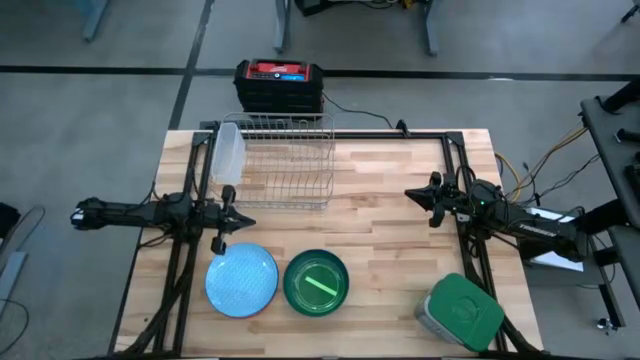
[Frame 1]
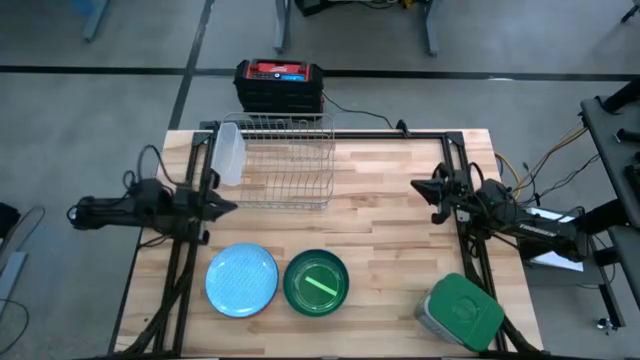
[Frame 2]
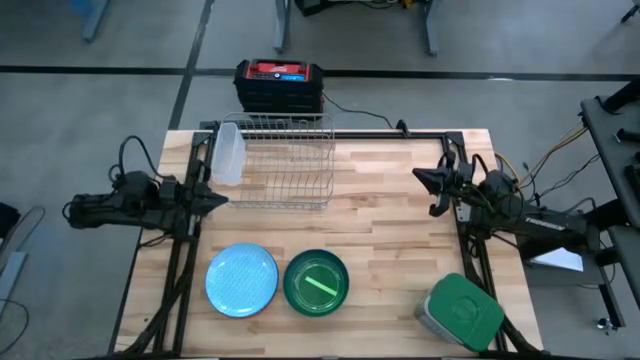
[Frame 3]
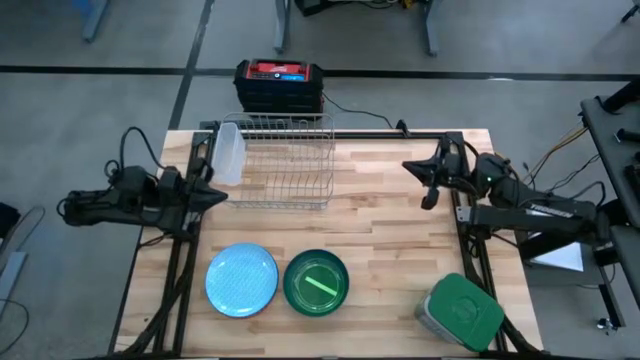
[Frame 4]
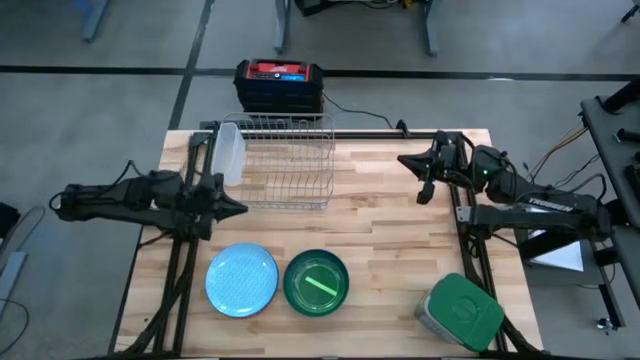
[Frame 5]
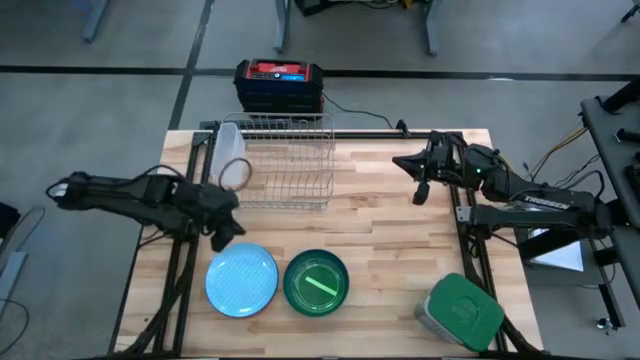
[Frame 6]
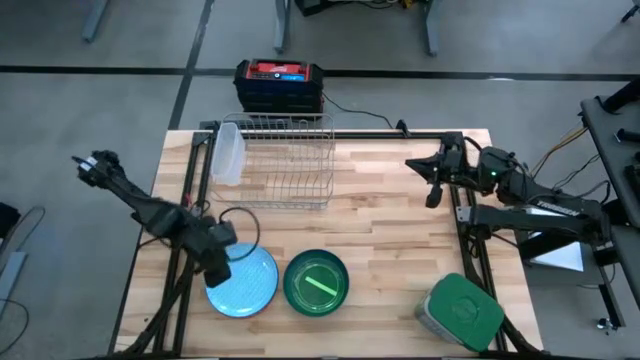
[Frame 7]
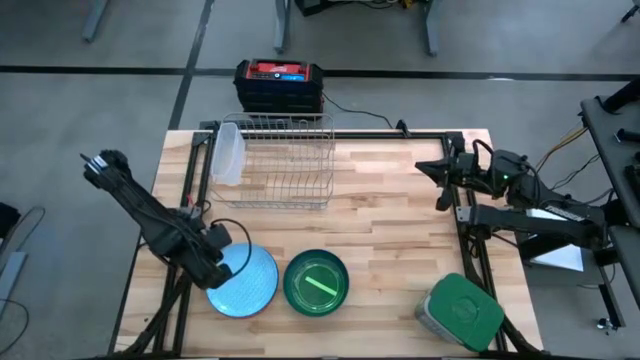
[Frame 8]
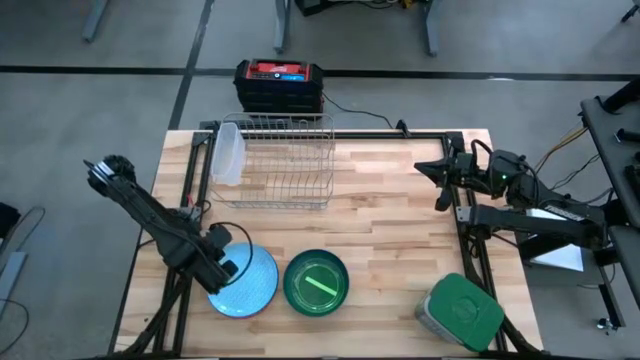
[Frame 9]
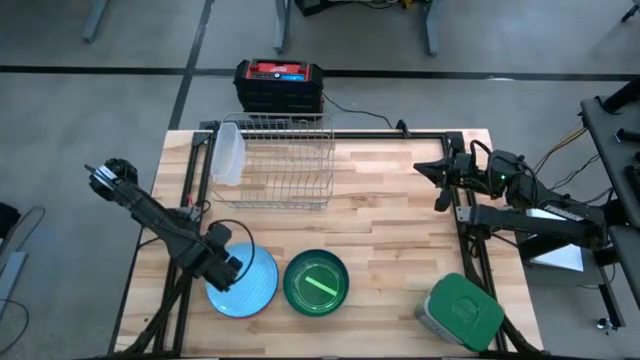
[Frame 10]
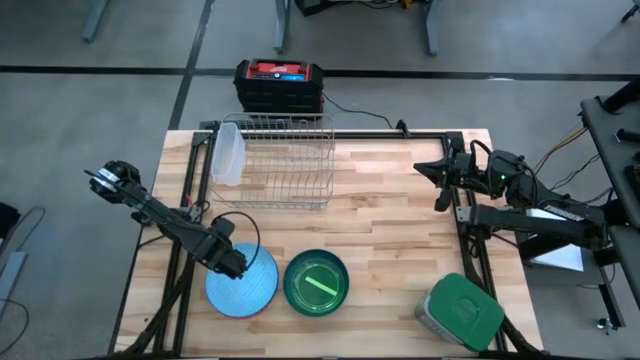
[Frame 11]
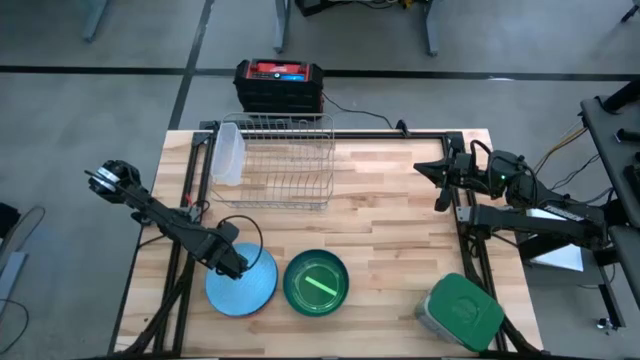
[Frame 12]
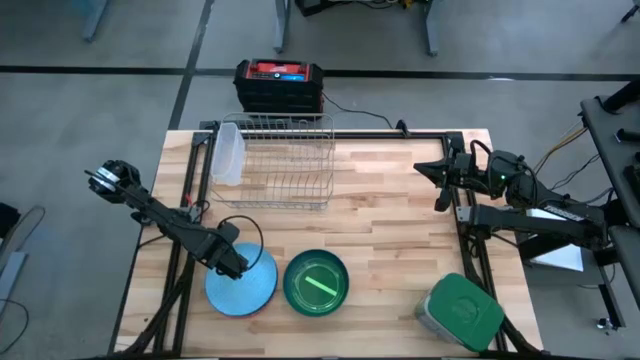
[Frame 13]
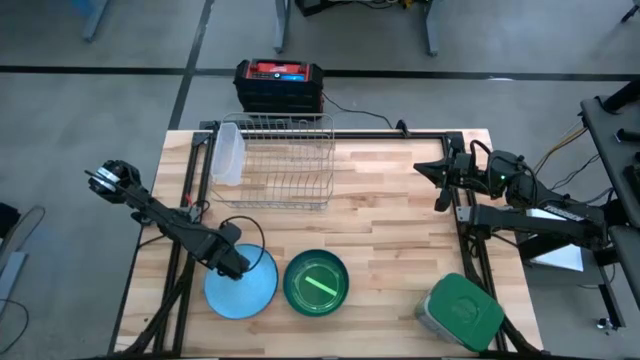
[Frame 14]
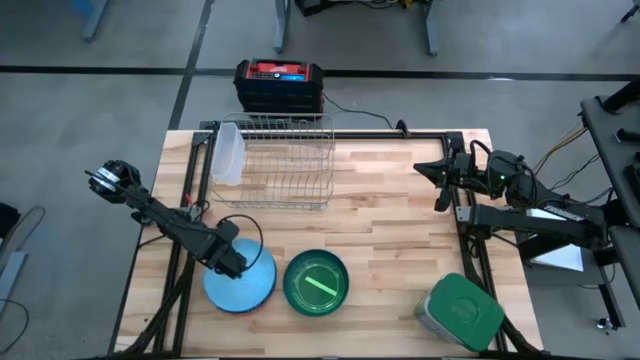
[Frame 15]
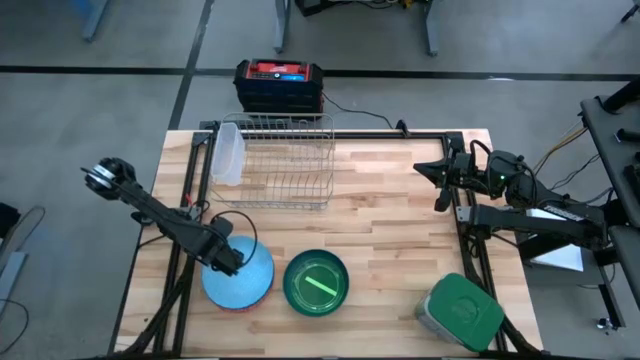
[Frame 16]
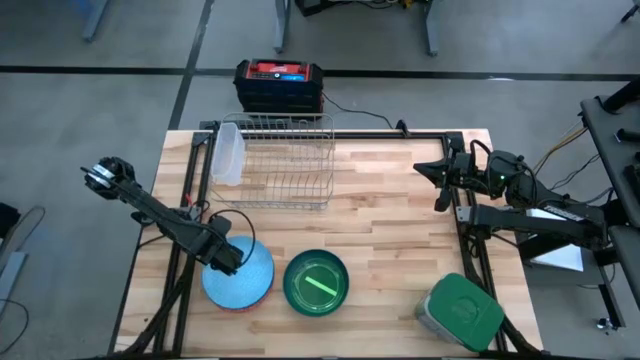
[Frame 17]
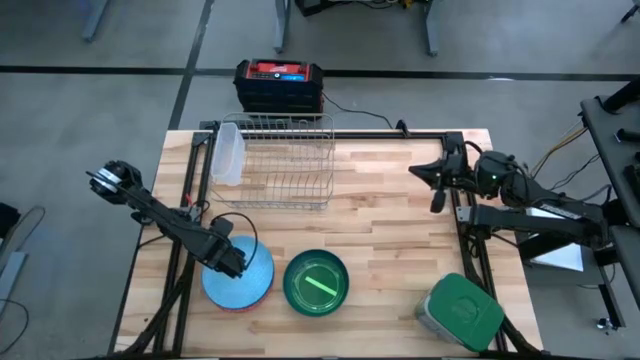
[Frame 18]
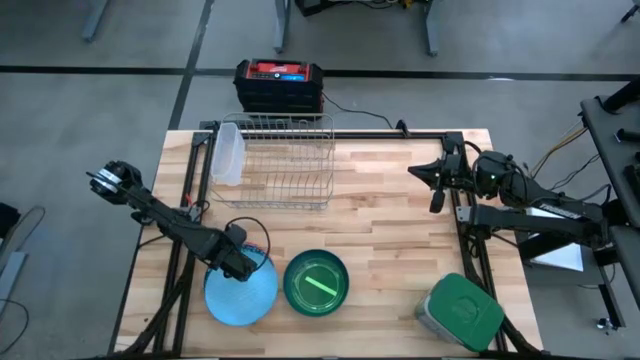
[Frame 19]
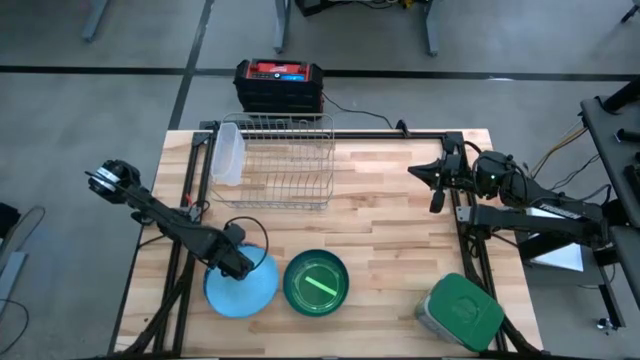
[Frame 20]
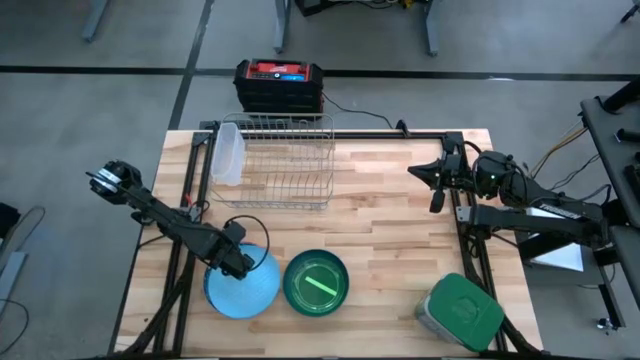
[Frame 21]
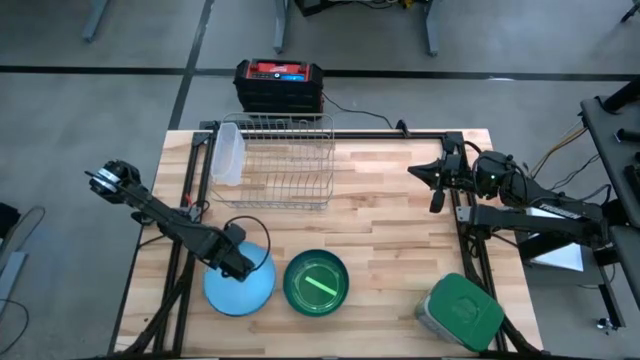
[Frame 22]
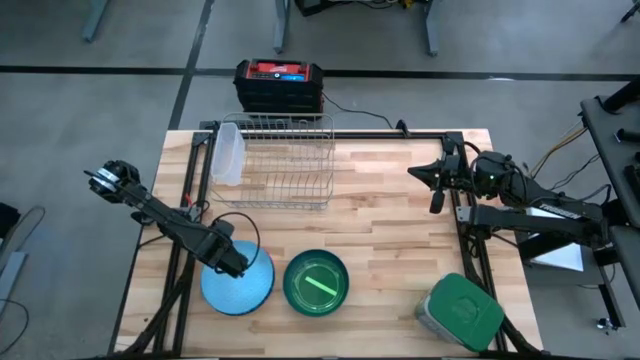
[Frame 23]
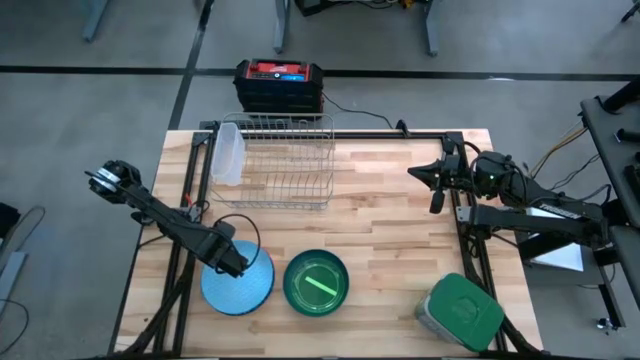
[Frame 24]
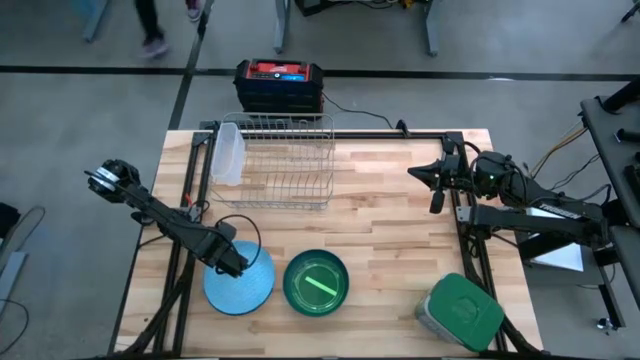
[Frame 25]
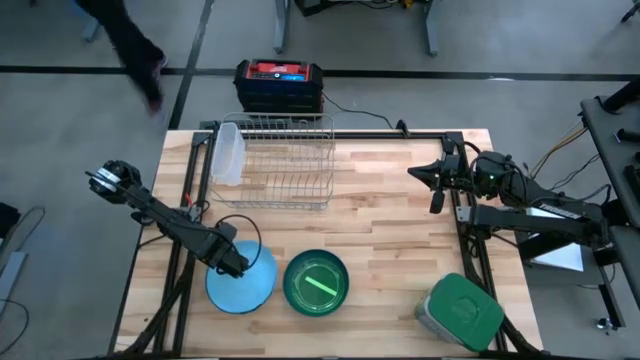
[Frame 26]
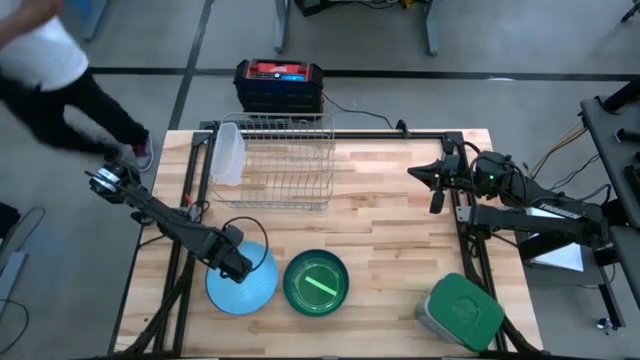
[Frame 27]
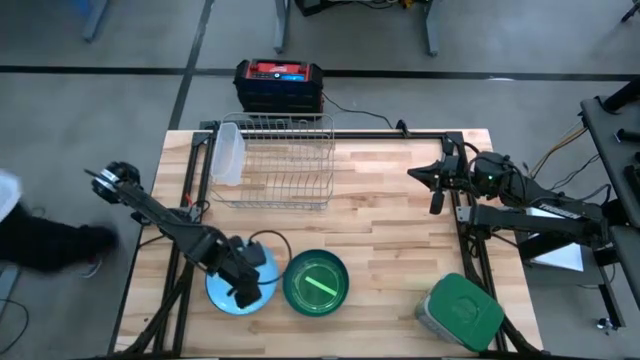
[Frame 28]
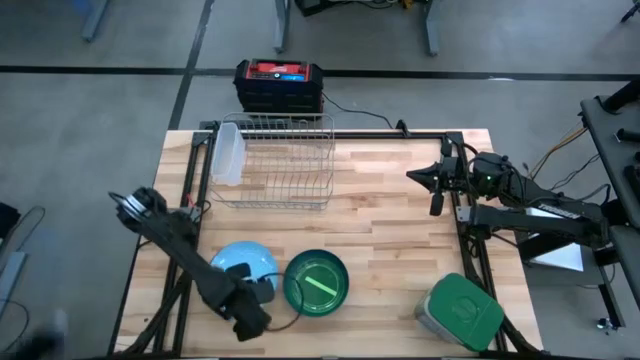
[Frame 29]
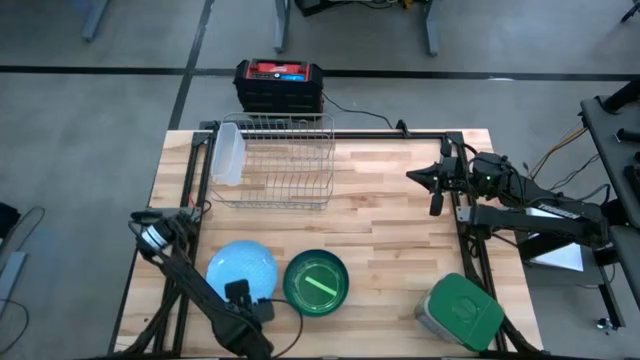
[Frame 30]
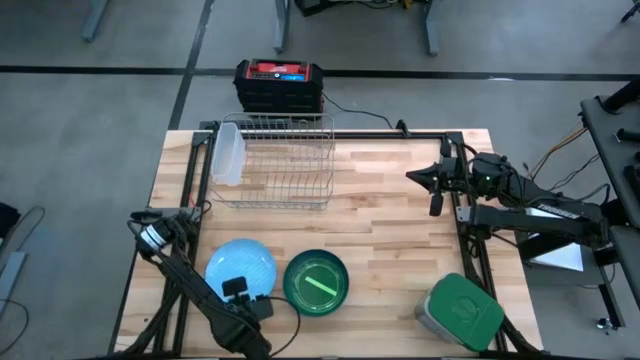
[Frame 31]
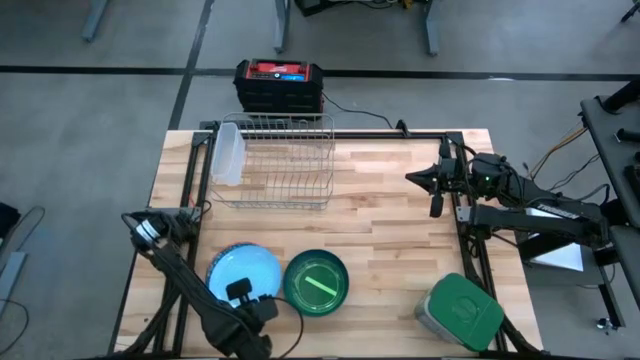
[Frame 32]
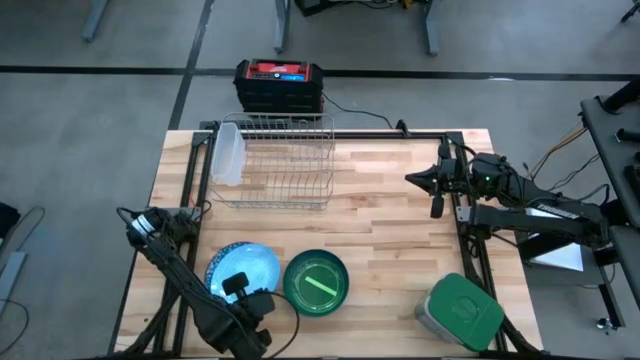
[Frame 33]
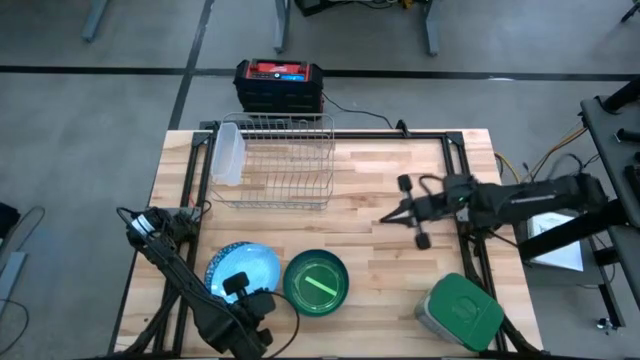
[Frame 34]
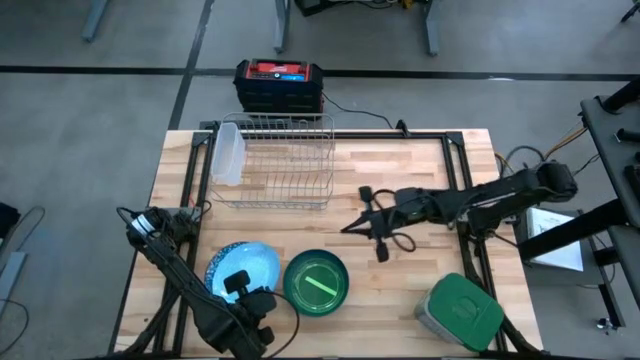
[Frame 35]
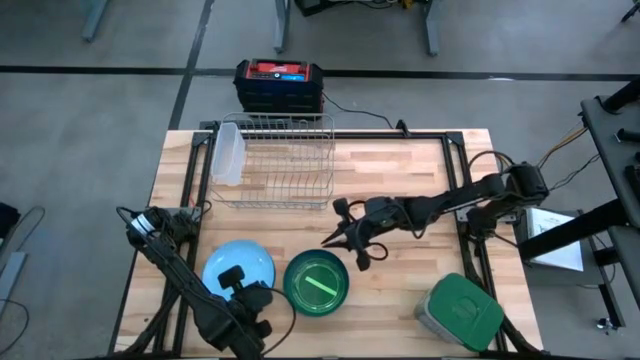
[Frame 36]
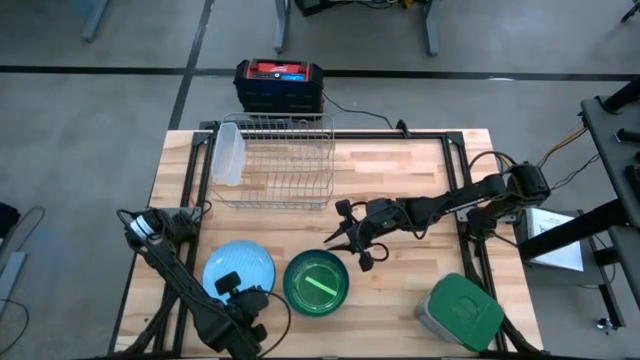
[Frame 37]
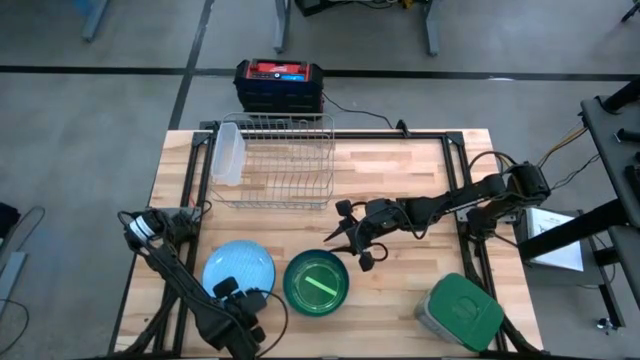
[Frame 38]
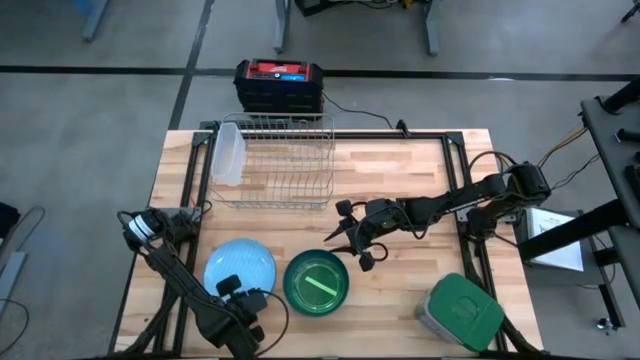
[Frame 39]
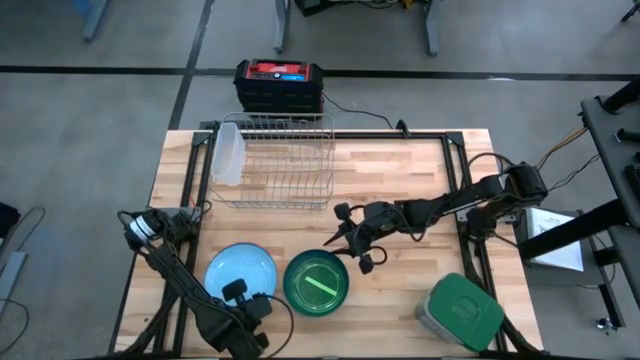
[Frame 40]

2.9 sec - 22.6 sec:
Task: Sort dishes
Put the light blue patterned plate into the dish rack
